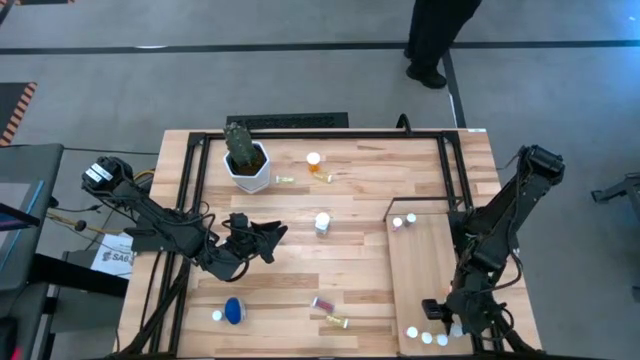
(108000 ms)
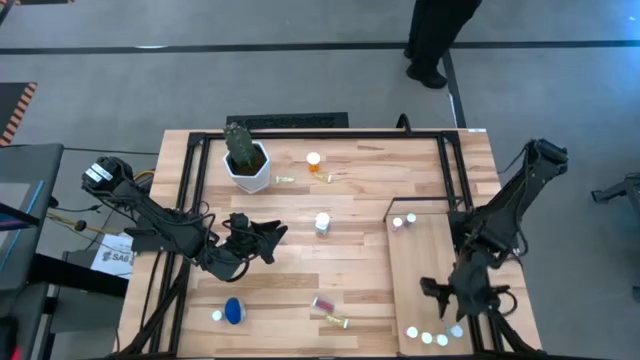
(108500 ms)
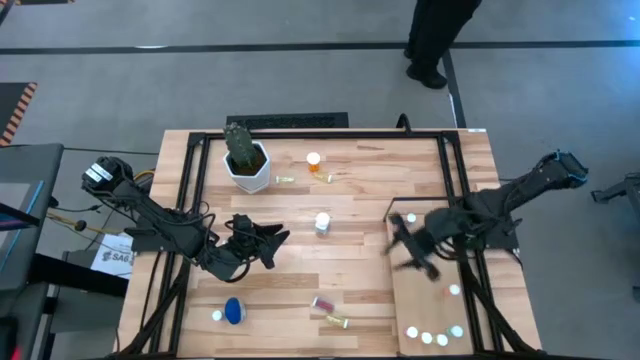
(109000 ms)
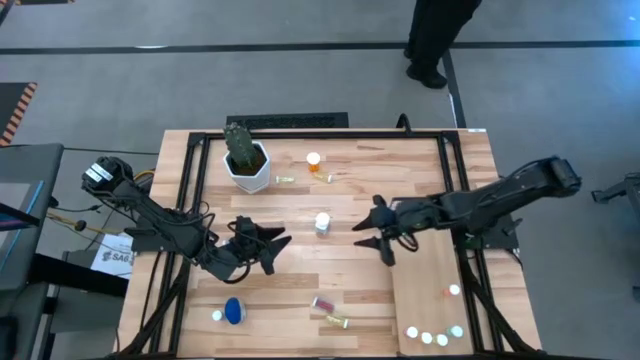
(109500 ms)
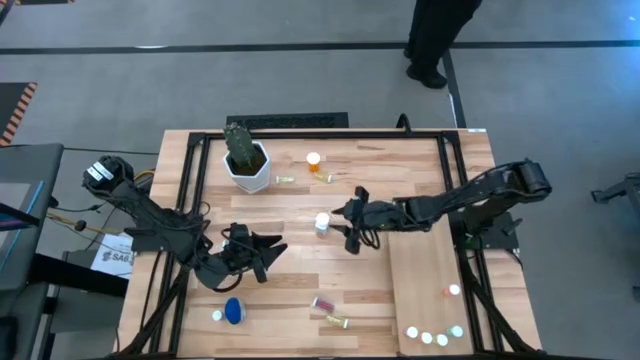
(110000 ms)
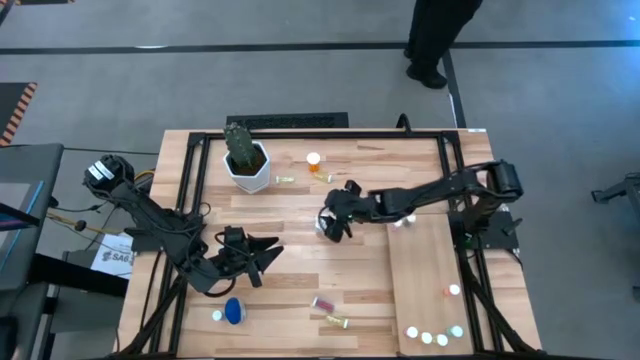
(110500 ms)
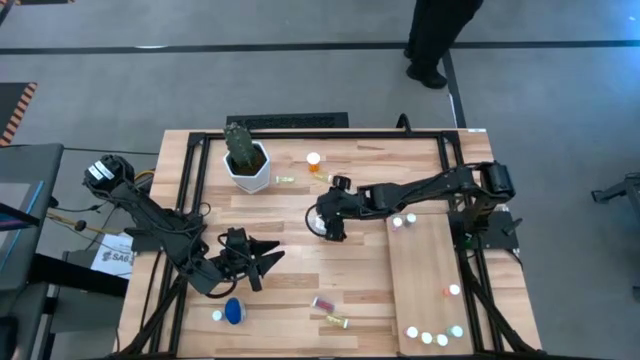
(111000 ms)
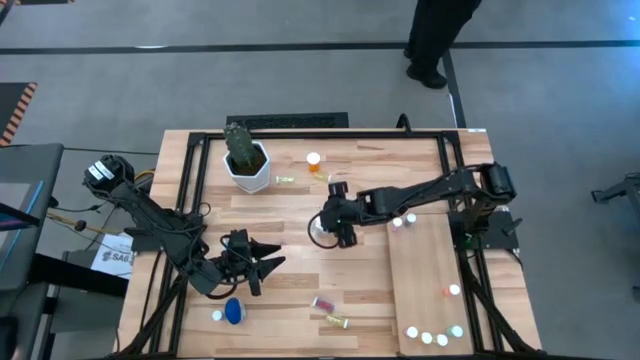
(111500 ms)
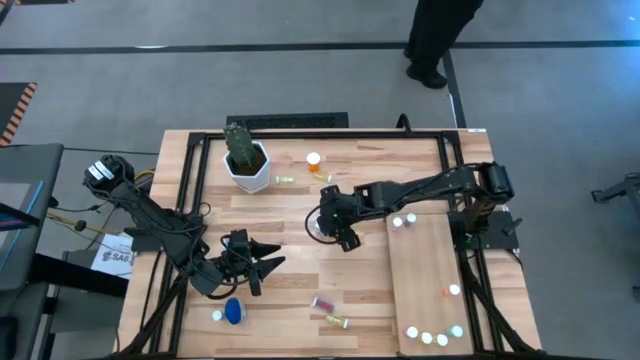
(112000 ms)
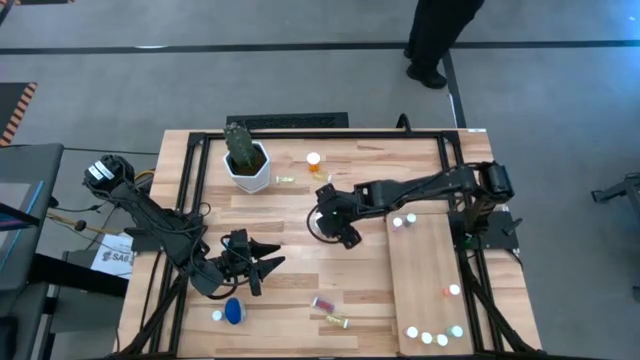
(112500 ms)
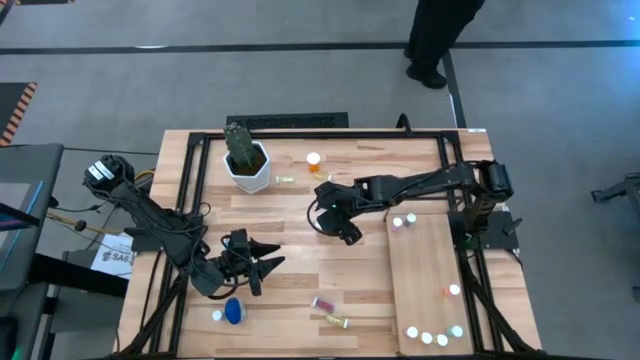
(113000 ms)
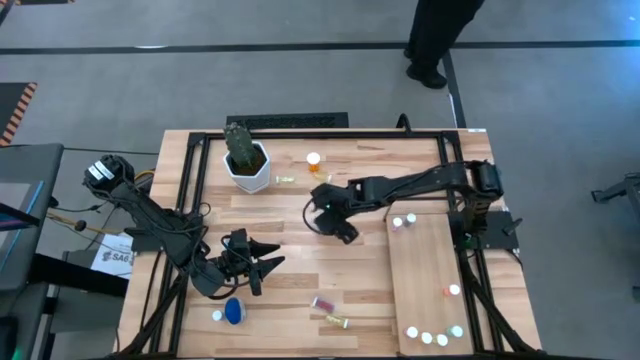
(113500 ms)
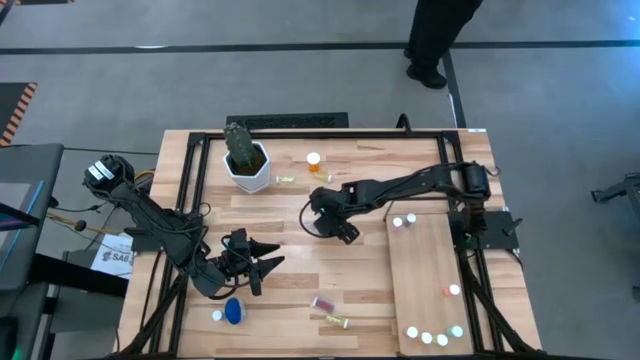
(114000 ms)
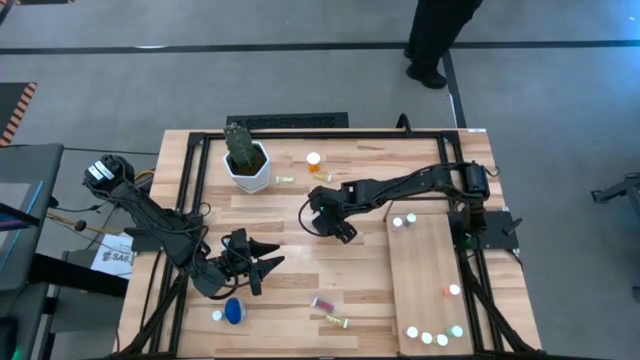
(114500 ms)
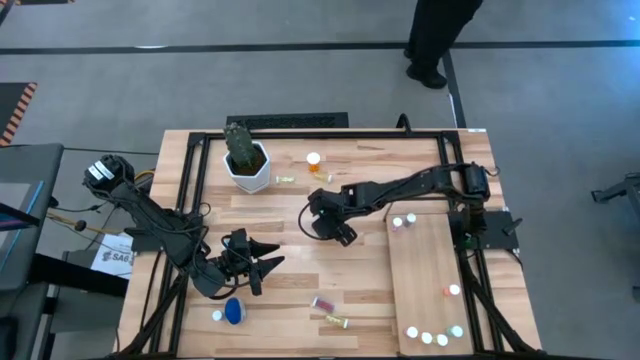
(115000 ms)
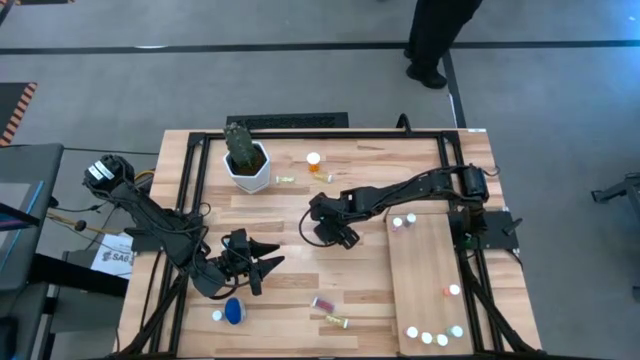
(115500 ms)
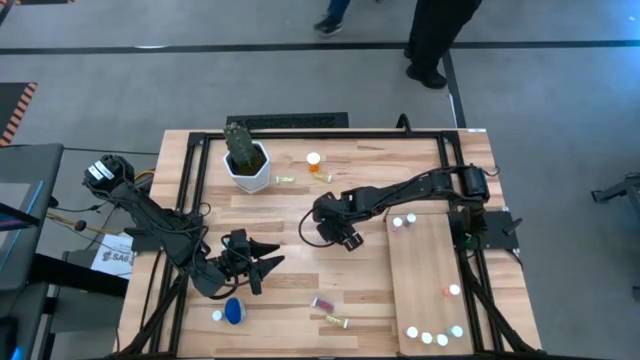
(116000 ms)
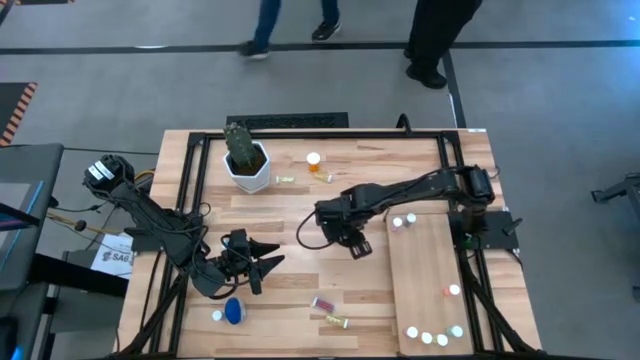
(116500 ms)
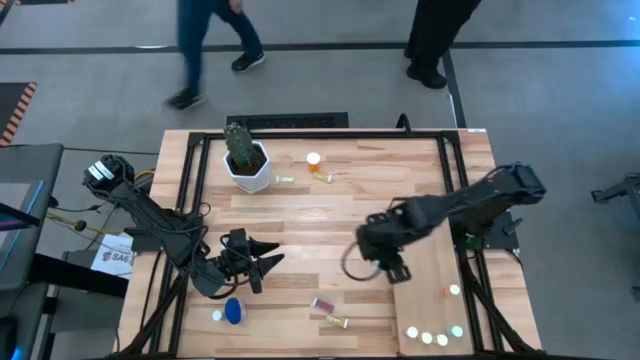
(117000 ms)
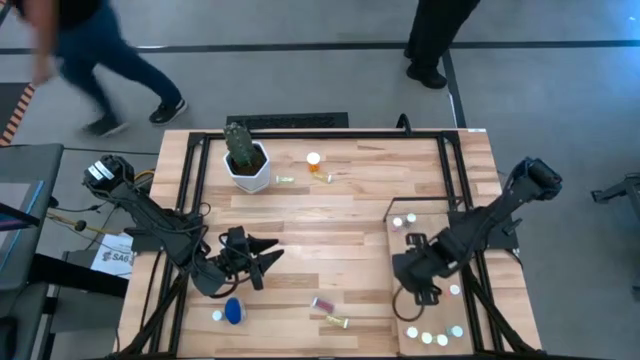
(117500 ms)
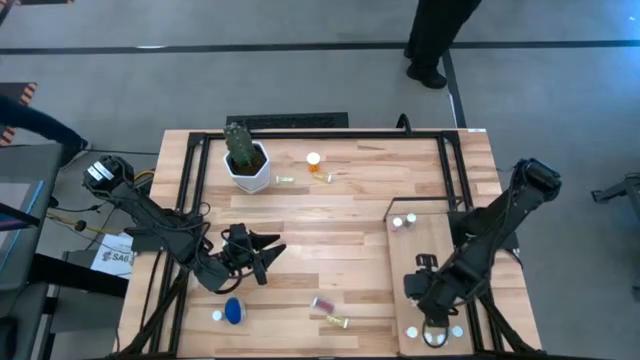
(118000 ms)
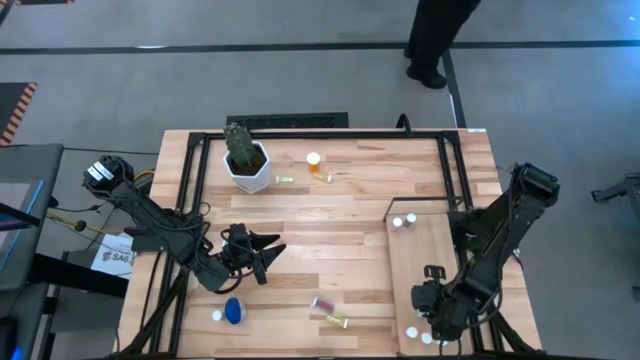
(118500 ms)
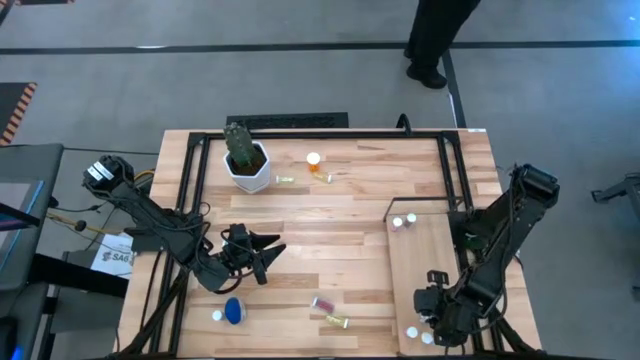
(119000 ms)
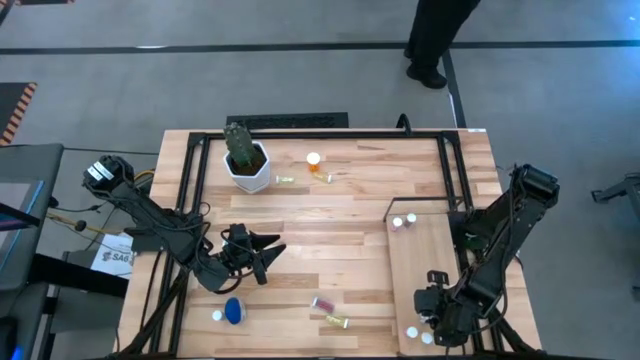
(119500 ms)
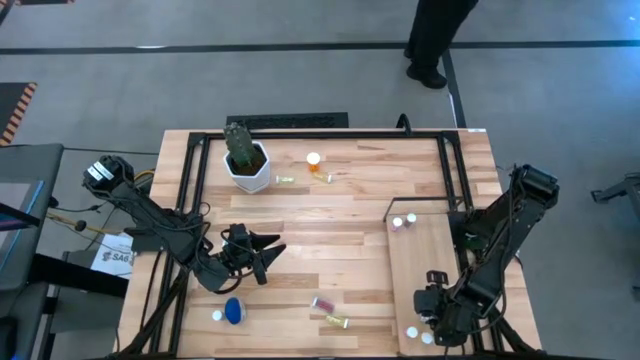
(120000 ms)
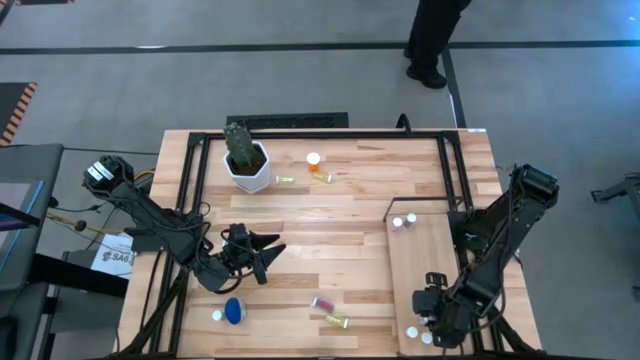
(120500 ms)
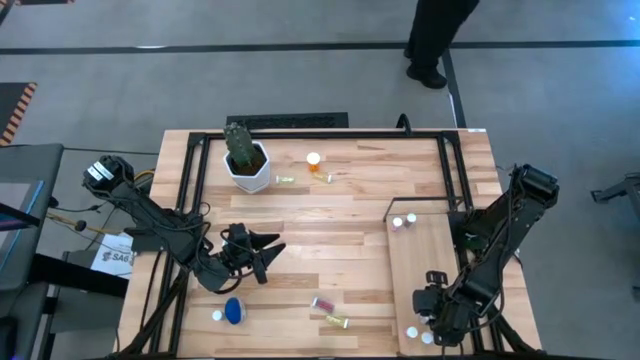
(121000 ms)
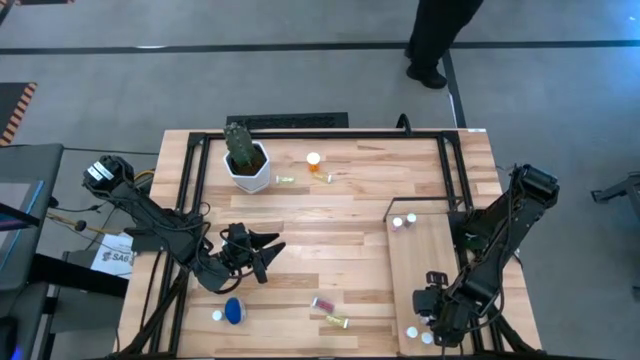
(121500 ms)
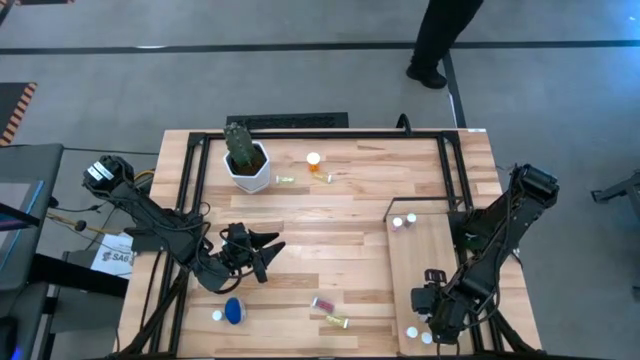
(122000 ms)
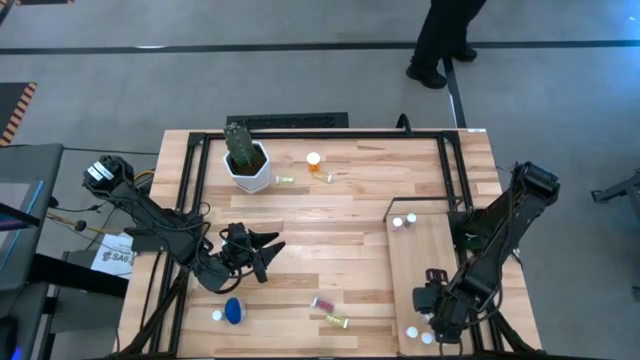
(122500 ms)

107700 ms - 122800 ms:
Task: Pick and place medicine bottles onto shelf by color
Put the white pill bottle on the shelf

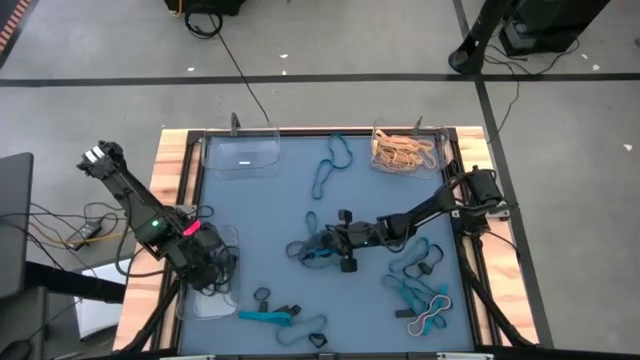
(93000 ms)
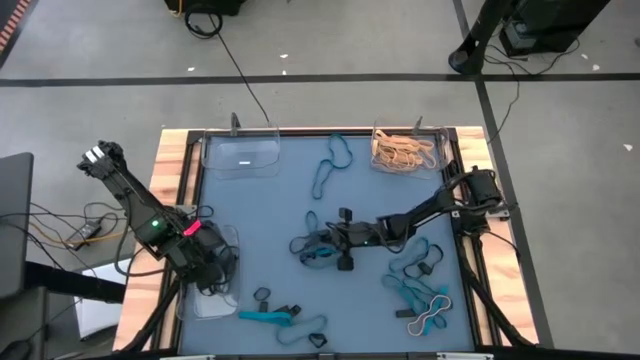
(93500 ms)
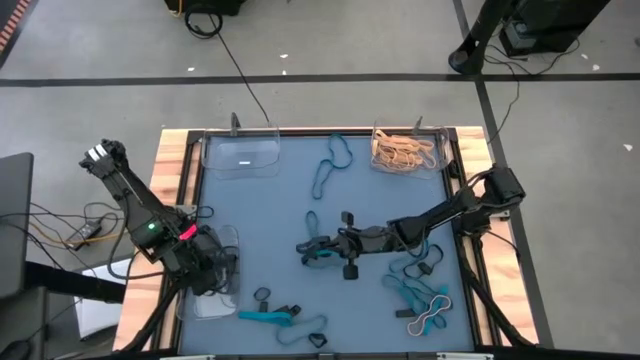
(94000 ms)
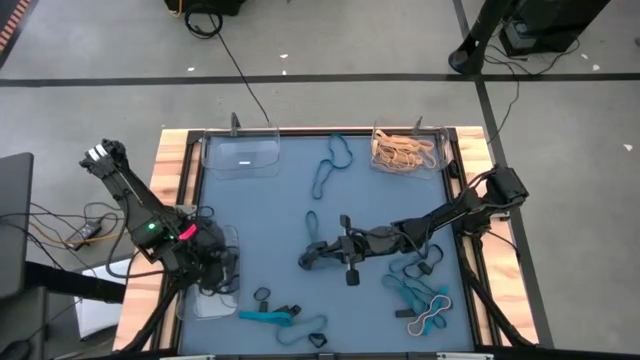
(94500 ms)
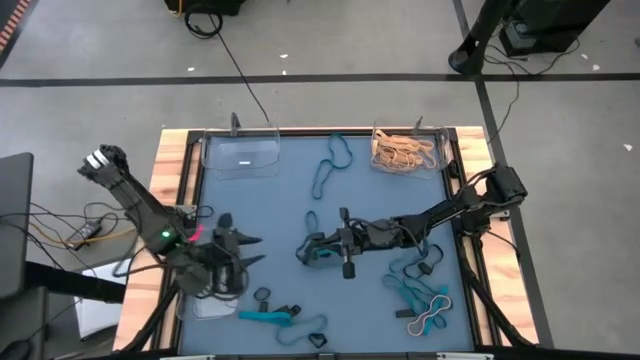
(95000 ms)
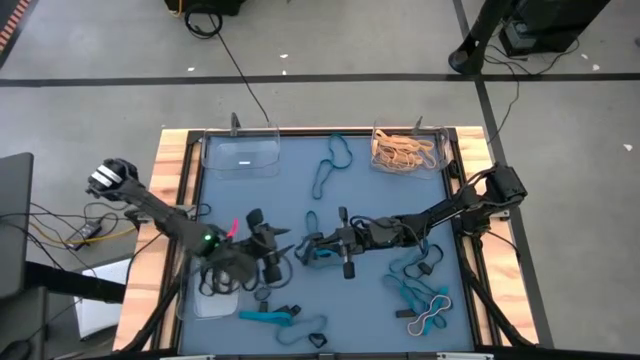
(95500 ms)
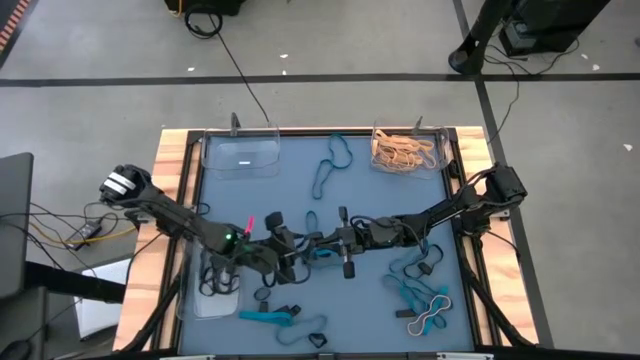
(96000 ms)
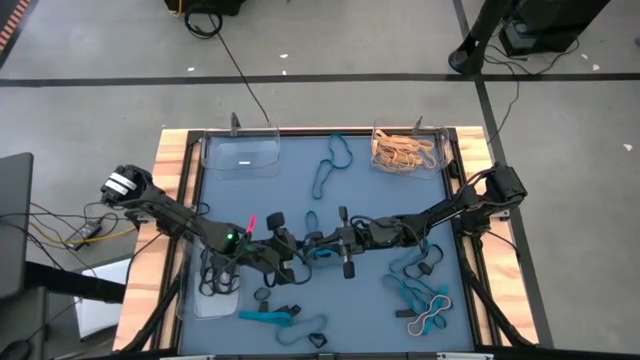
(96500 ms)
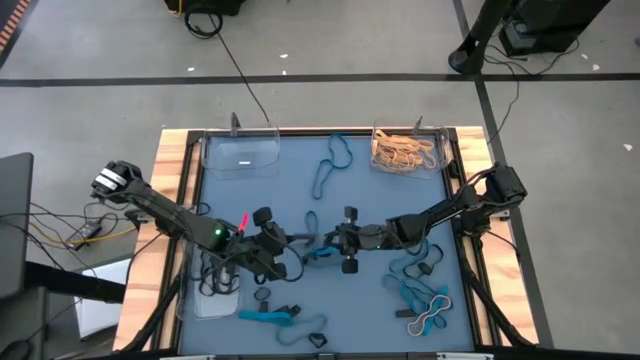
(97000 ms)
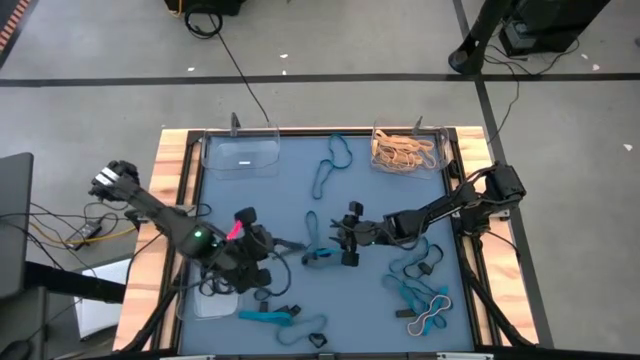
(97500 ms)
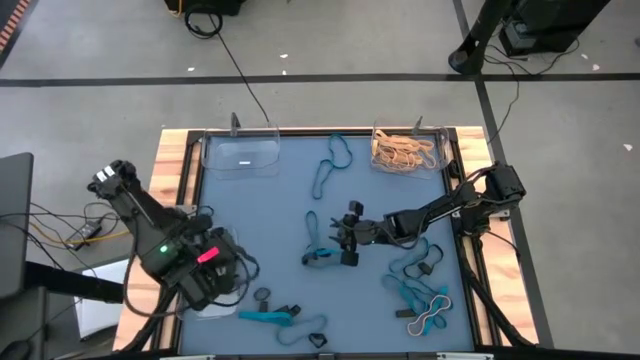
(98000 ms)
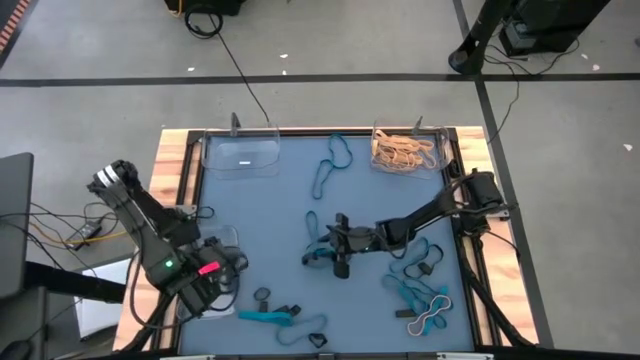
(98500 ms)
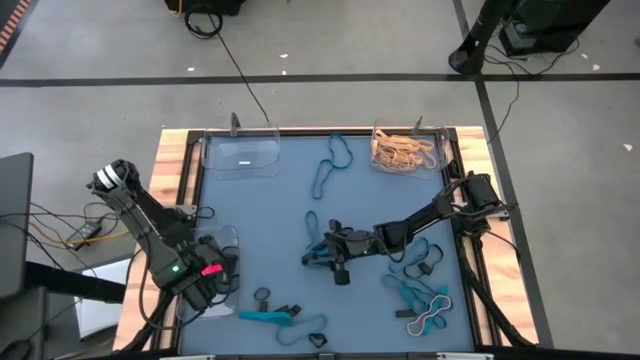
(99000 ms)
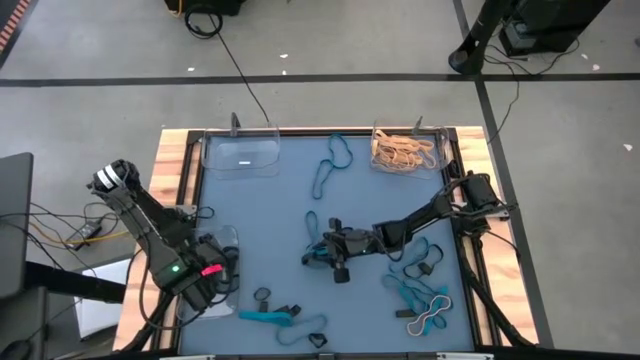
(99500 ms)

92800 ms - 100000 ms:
Task: Sort rubber bands into baskets
Put the big black rubber band into the bottom left transparent bin
